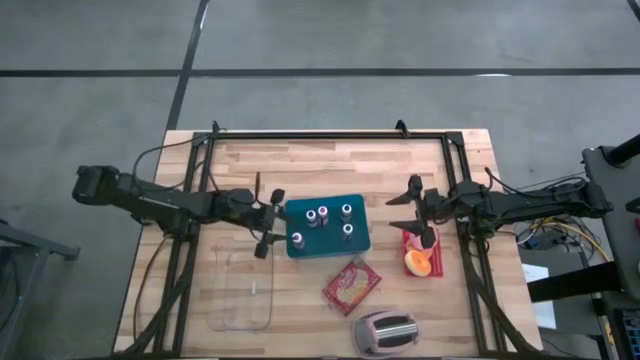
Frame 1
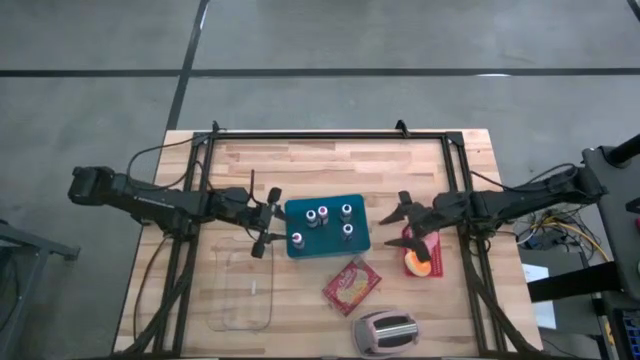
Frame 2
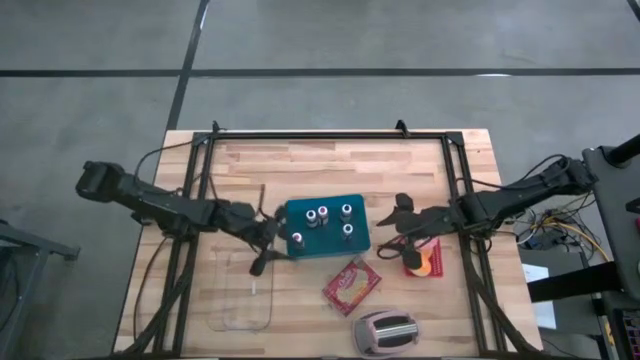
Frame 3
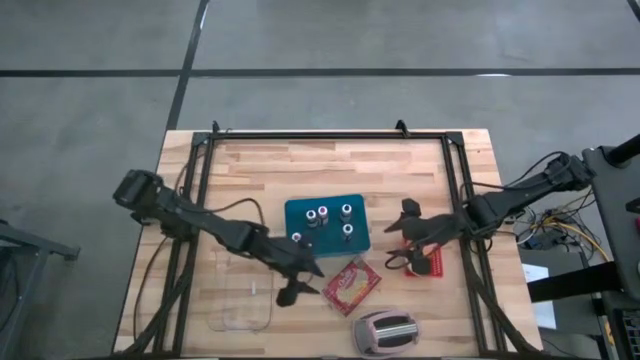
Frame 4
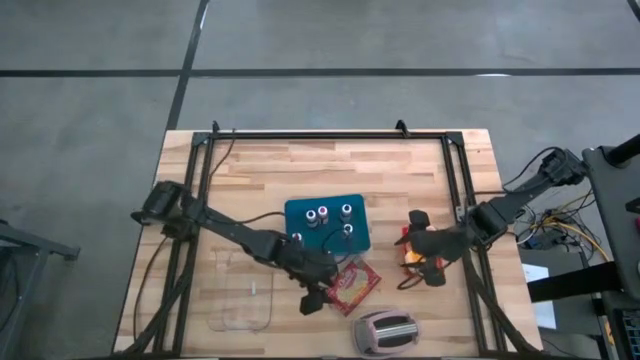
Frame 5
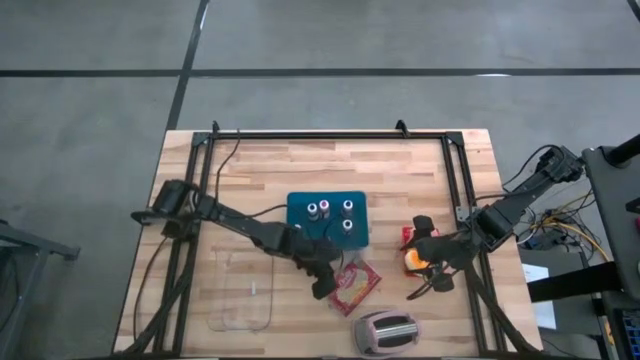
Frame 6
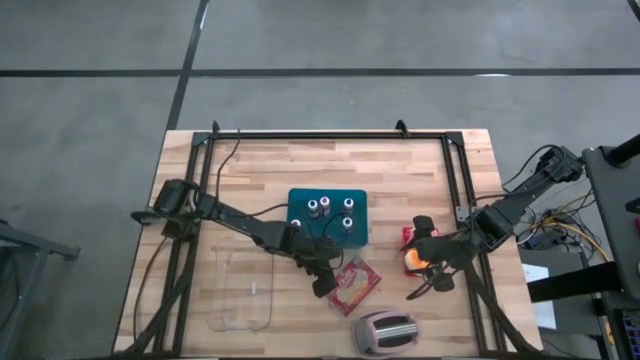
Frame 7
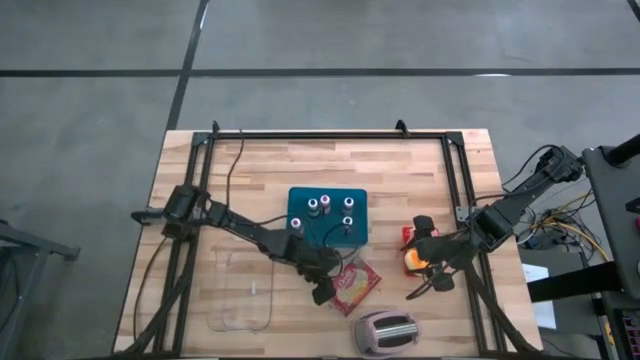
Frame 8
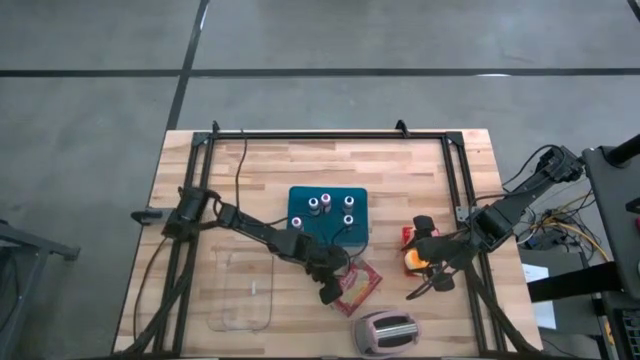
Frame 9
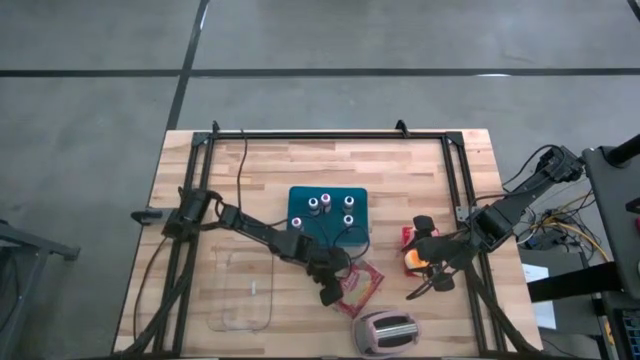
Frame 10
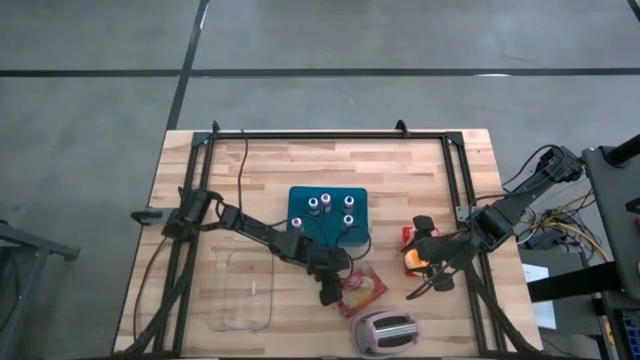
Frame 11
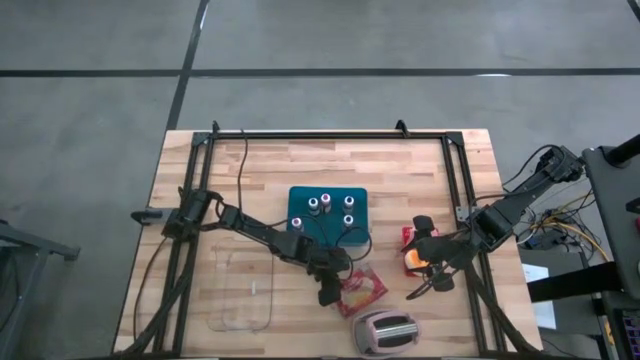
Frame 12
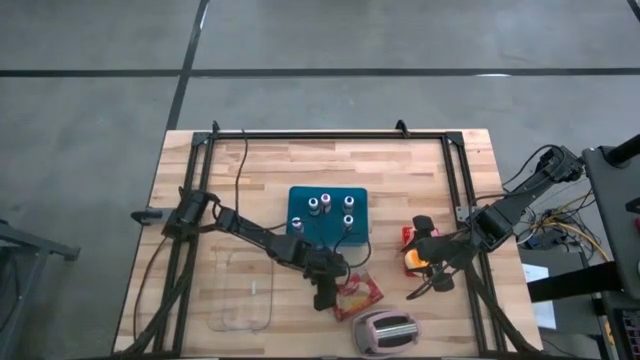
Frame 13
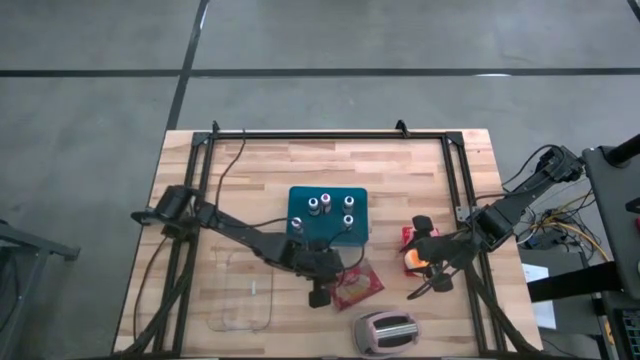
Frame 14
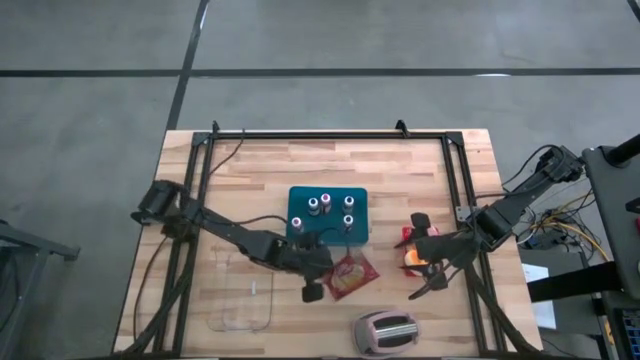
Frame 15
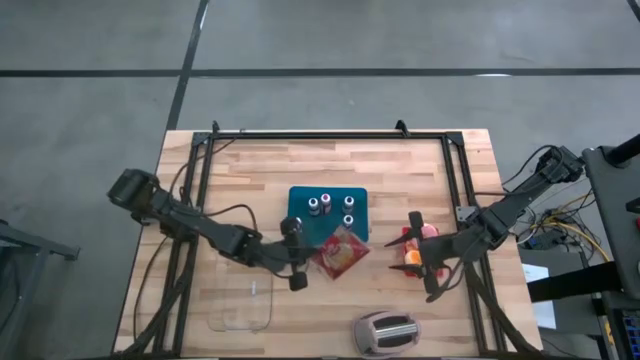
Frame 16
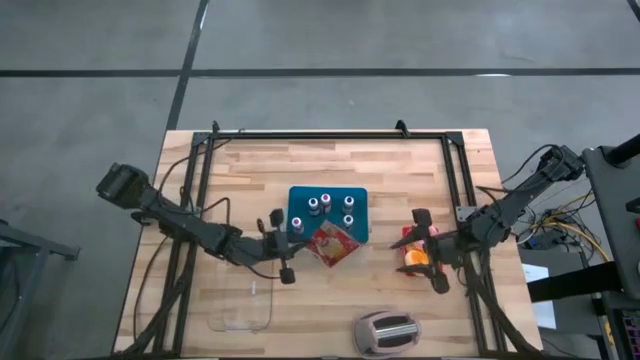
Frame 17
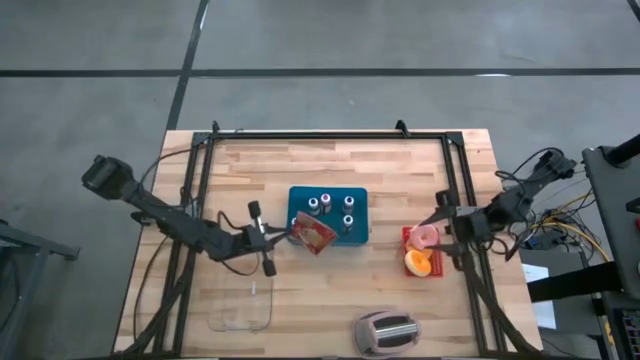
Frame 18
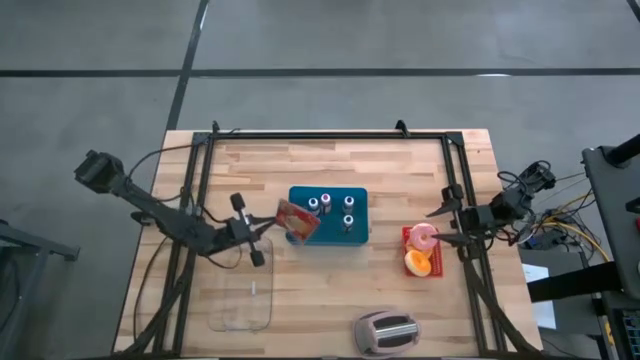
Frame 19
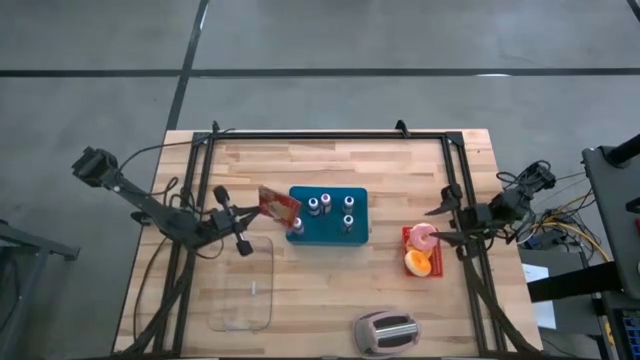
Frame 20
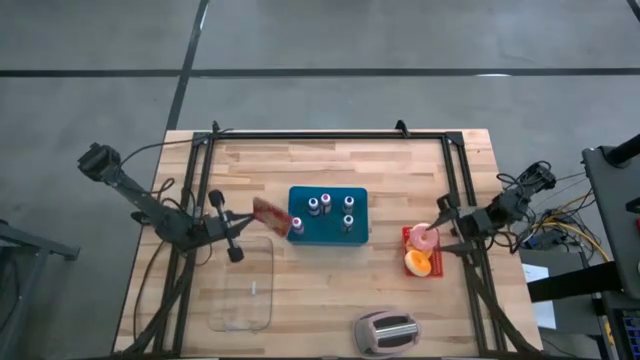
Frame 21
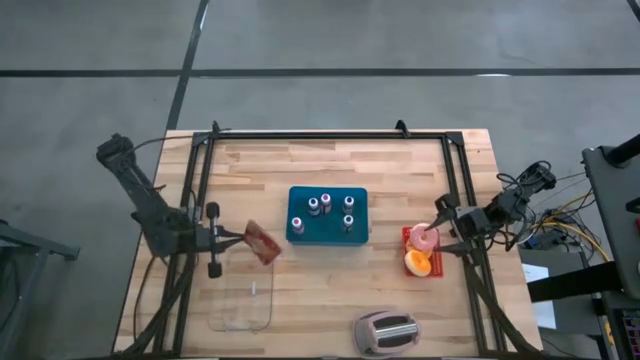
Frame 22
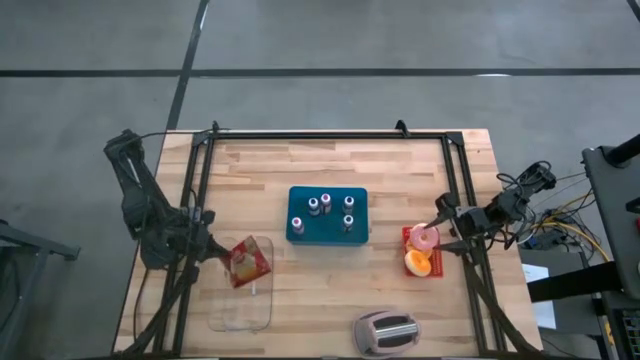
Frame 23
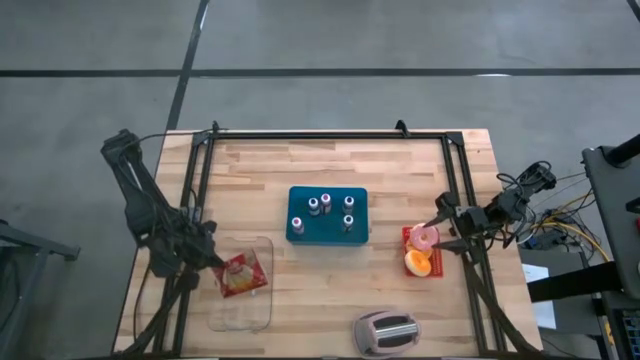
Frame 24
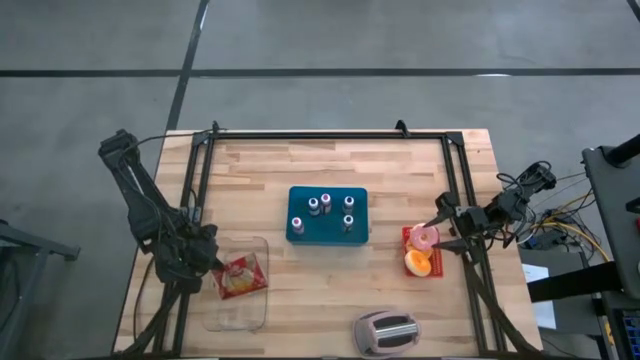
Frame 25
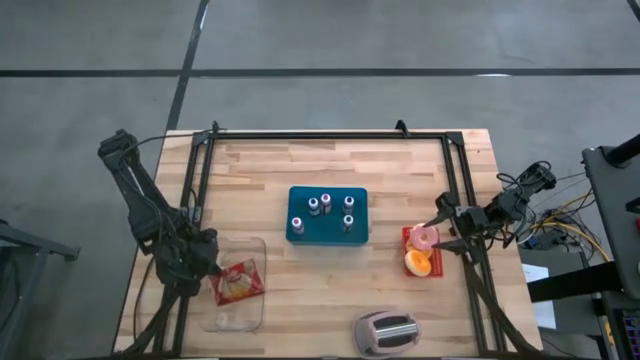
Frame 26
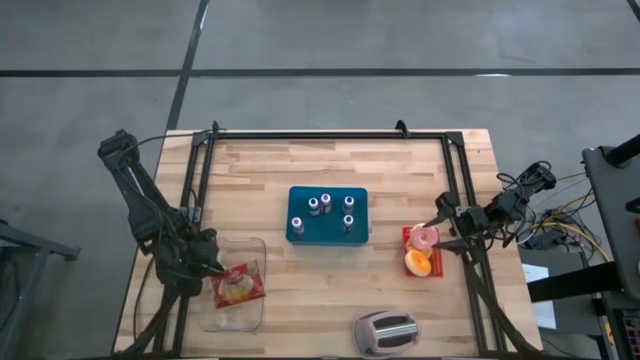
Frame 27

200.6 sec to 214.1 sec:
Task: Pick & Place Food Item
Put the red popcorn bag into the transparent bin

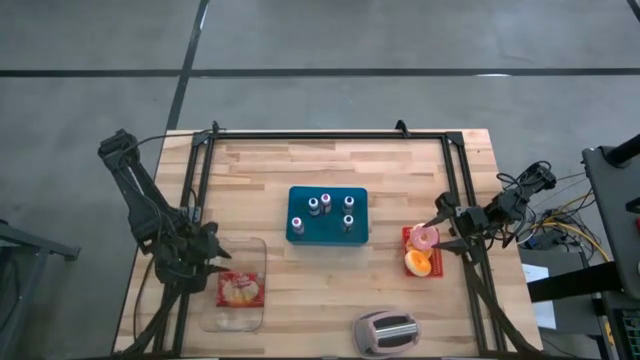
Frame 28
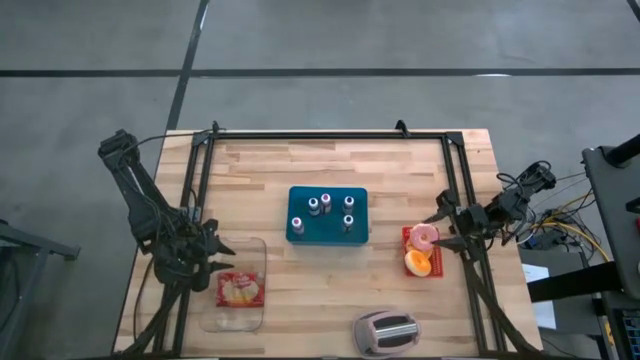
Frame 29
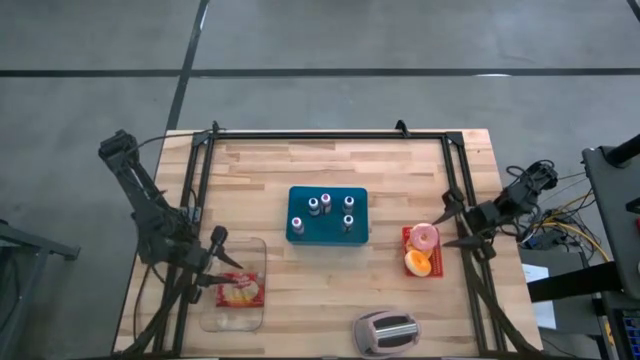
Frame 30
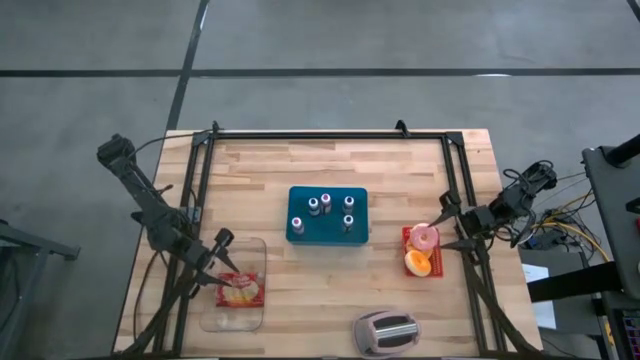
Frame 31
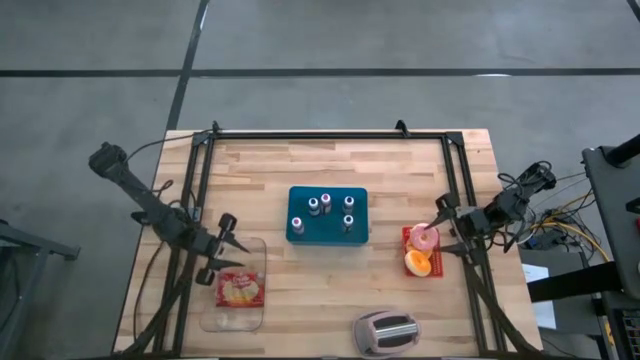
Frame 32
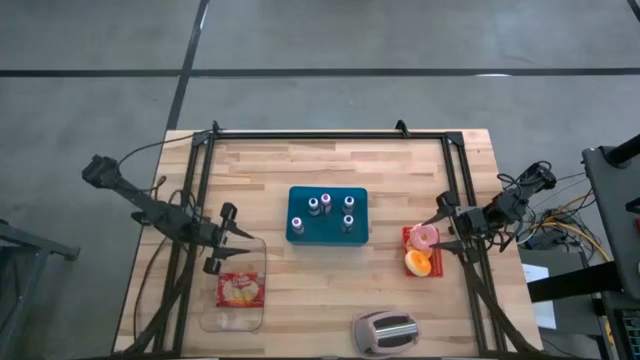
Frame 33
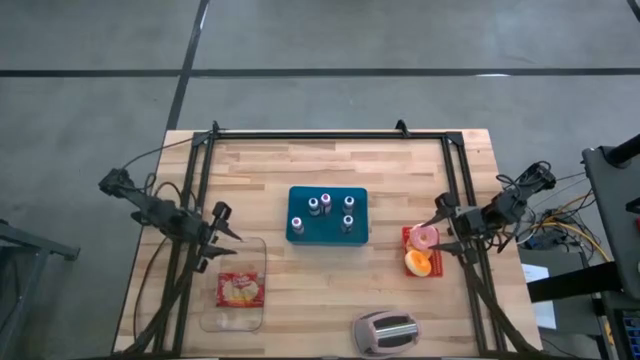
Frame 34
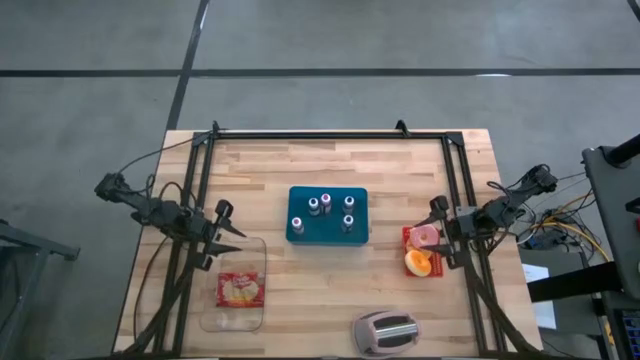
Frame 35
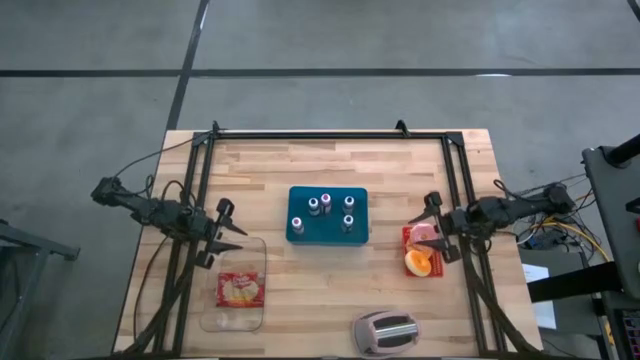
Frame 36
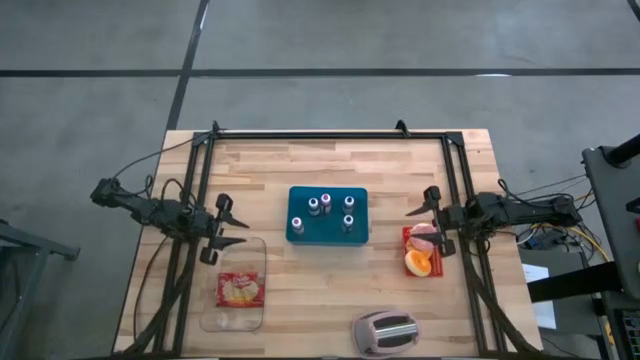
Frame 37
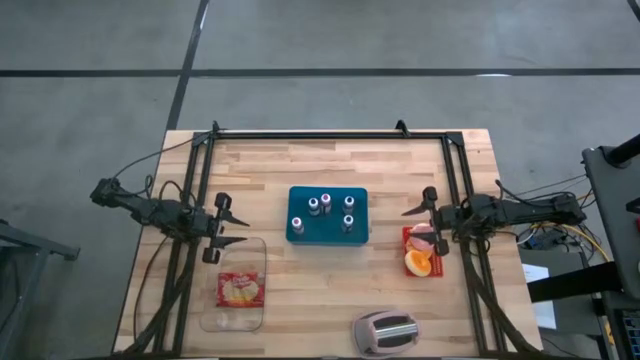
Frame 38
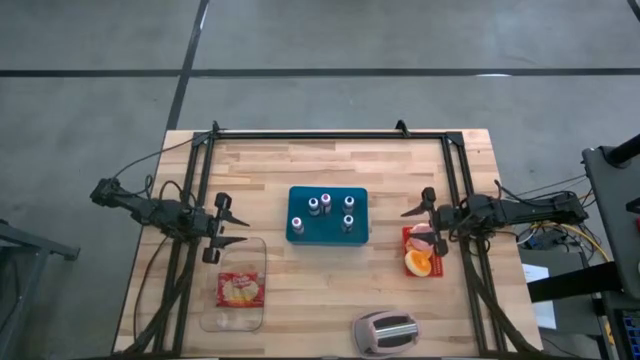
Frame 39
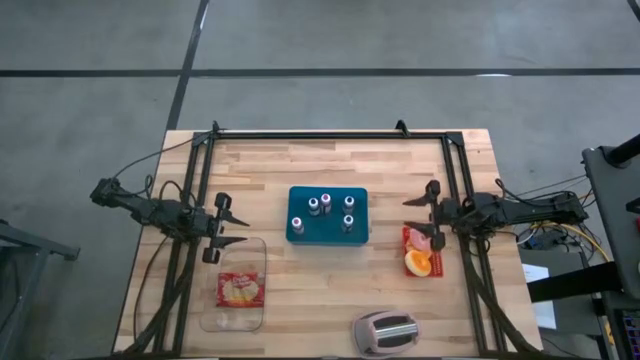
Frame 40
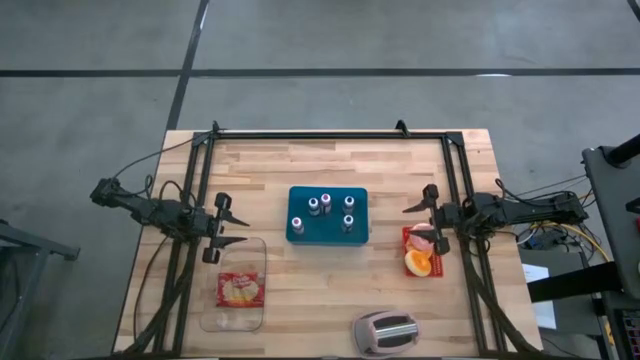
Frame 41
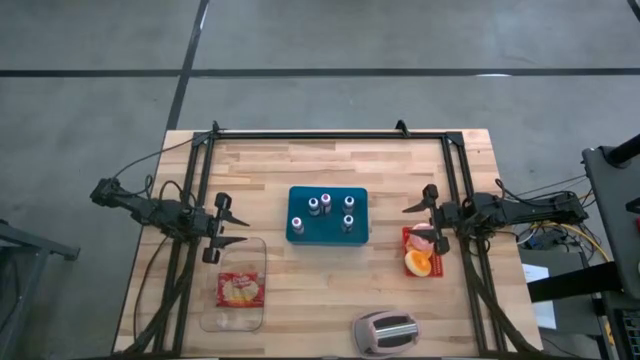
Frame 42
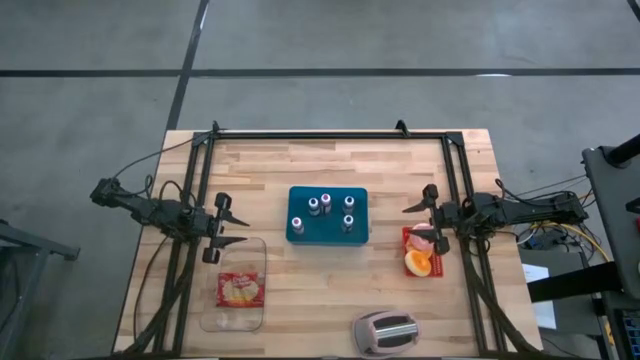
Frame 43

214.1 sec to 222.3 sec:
Return to Home Position
